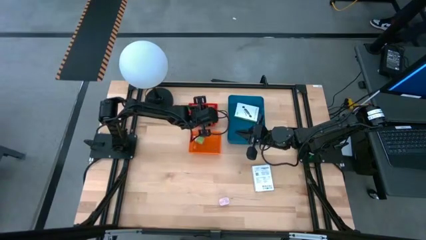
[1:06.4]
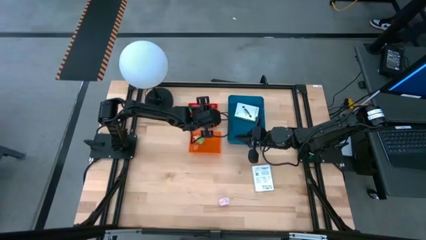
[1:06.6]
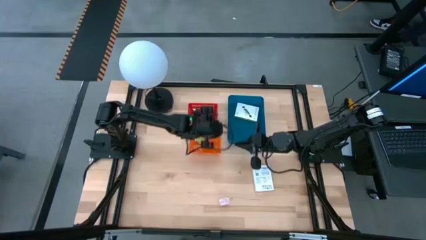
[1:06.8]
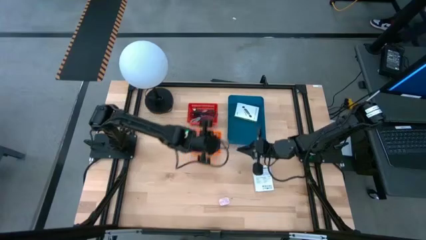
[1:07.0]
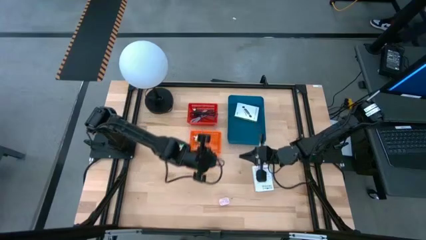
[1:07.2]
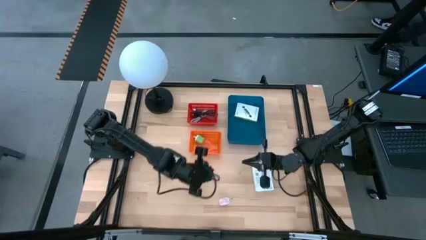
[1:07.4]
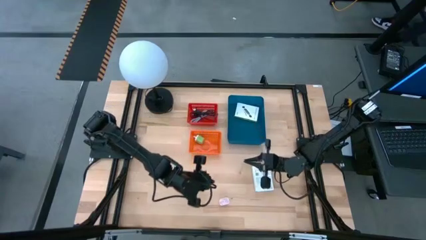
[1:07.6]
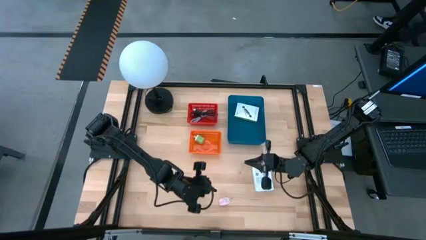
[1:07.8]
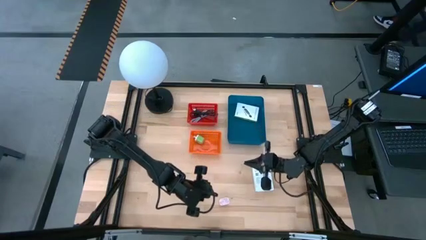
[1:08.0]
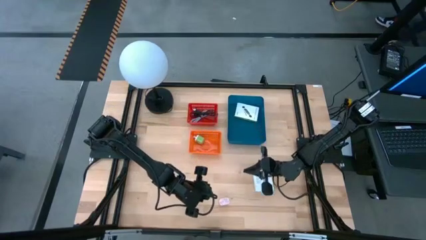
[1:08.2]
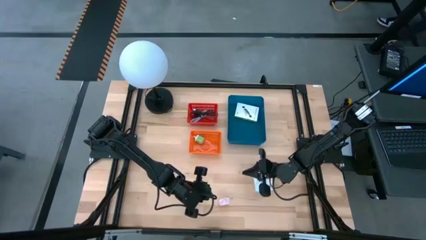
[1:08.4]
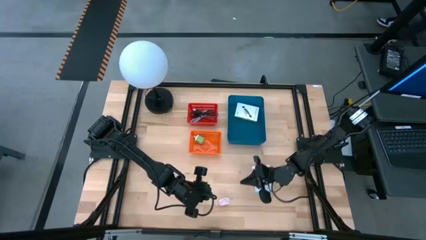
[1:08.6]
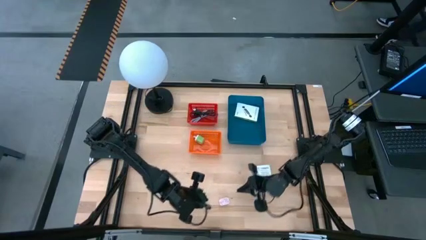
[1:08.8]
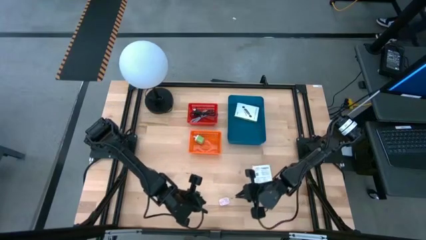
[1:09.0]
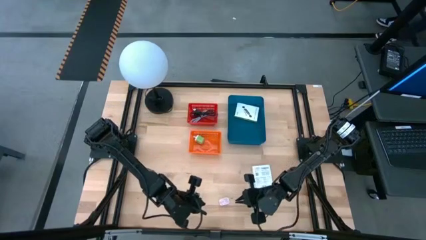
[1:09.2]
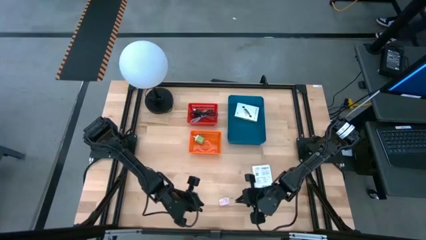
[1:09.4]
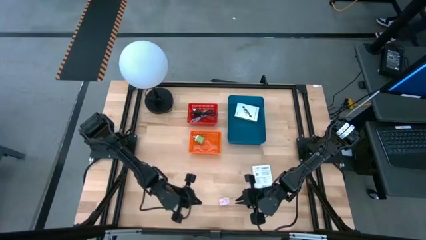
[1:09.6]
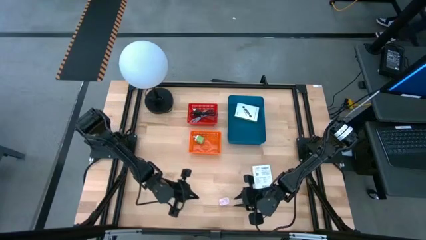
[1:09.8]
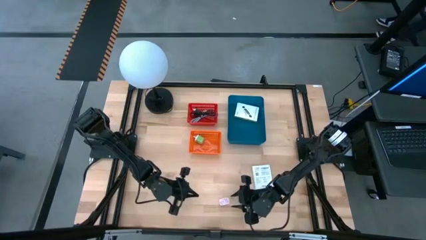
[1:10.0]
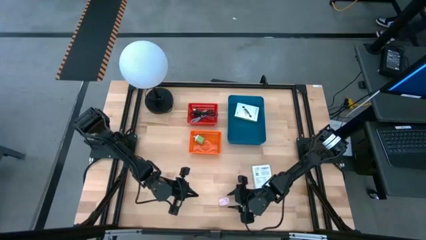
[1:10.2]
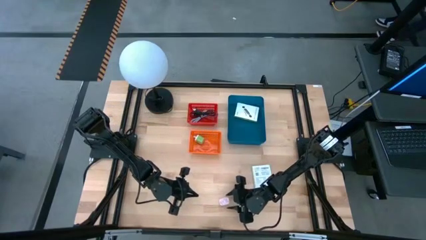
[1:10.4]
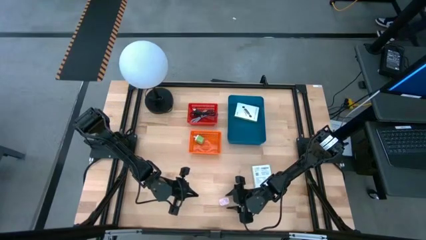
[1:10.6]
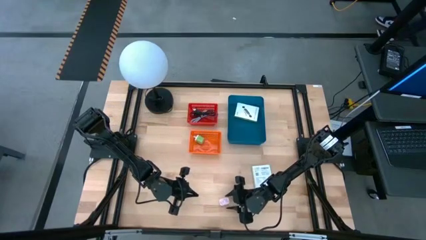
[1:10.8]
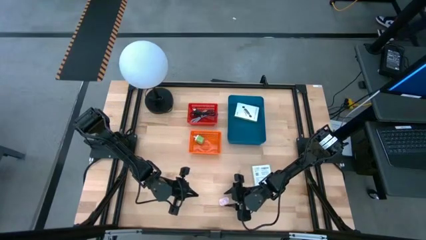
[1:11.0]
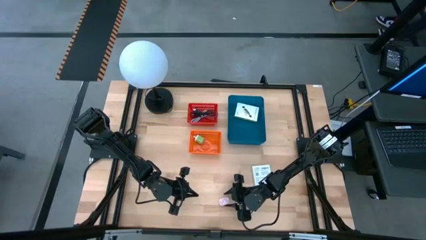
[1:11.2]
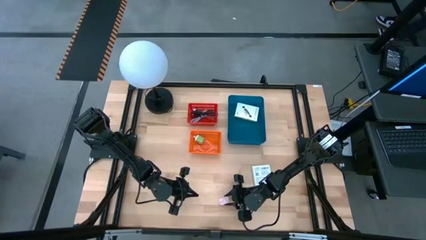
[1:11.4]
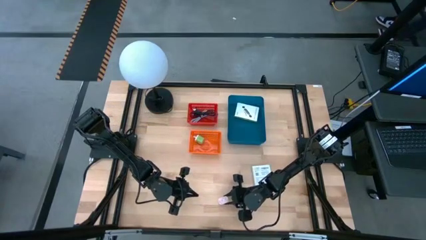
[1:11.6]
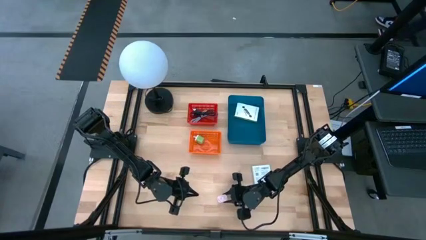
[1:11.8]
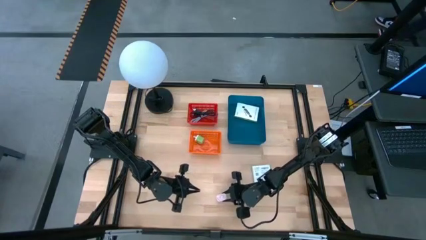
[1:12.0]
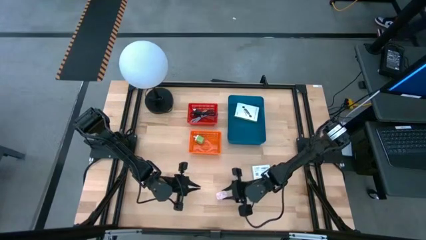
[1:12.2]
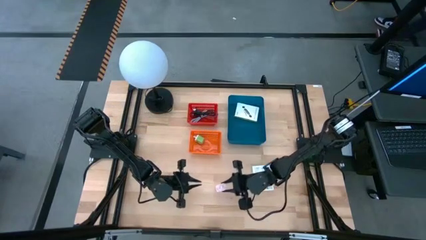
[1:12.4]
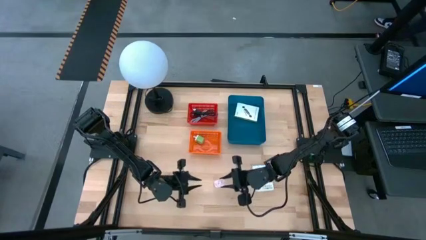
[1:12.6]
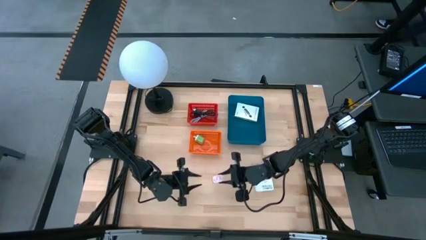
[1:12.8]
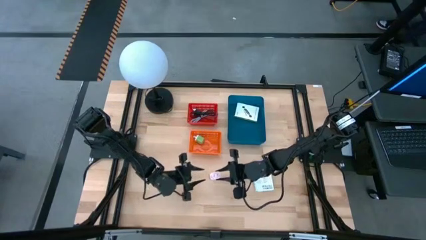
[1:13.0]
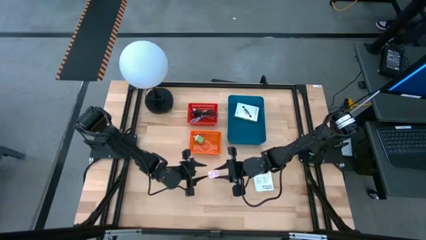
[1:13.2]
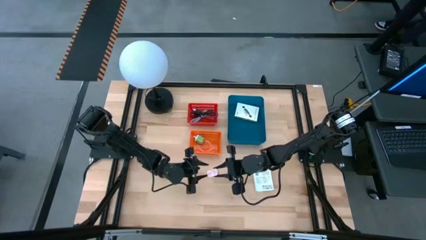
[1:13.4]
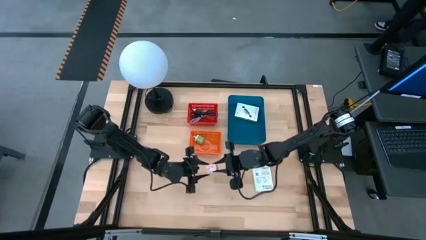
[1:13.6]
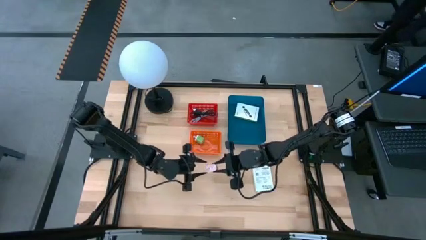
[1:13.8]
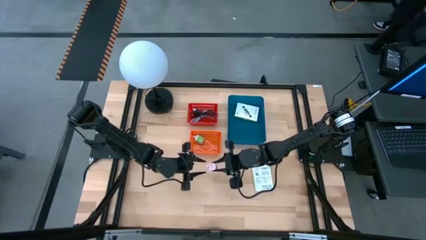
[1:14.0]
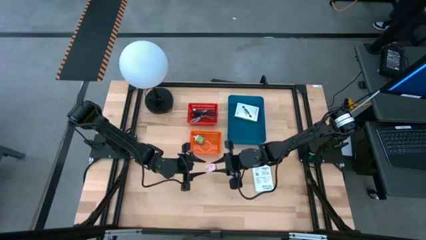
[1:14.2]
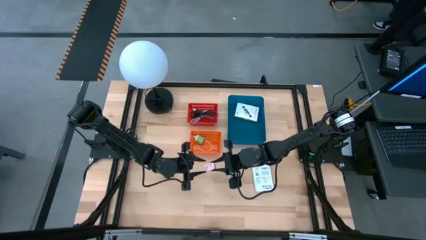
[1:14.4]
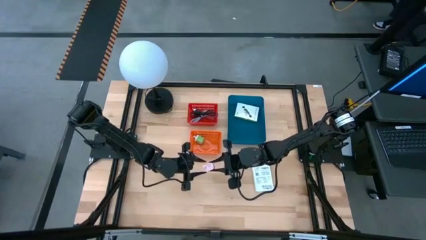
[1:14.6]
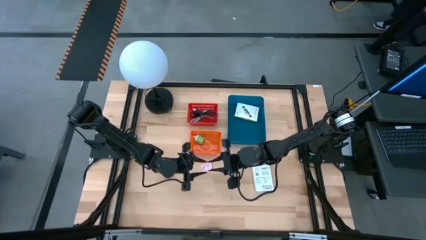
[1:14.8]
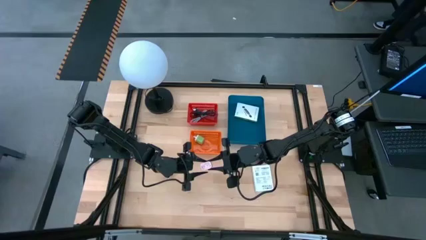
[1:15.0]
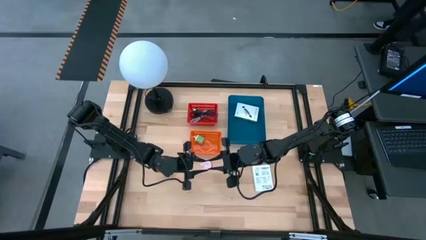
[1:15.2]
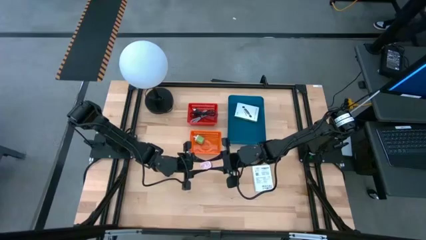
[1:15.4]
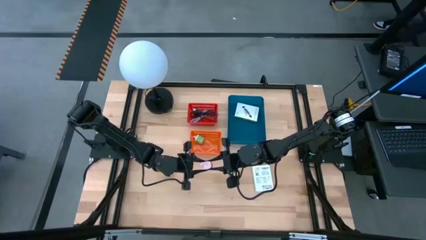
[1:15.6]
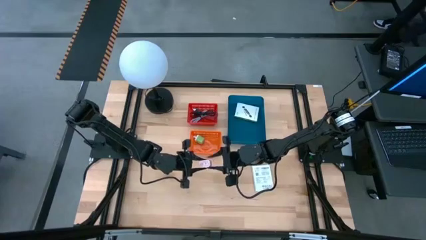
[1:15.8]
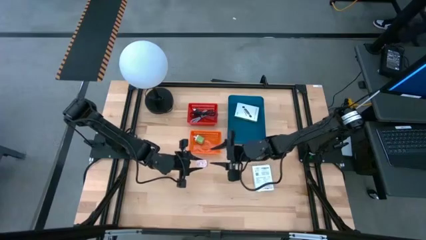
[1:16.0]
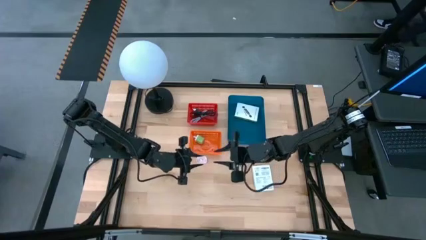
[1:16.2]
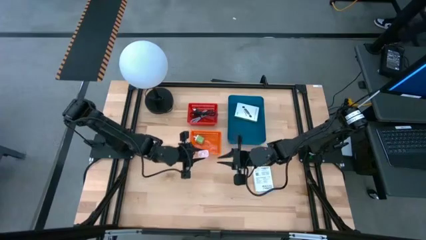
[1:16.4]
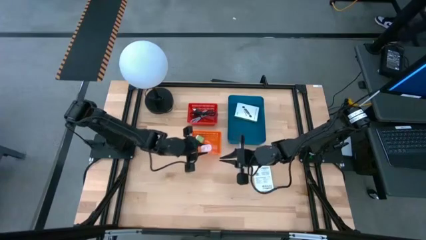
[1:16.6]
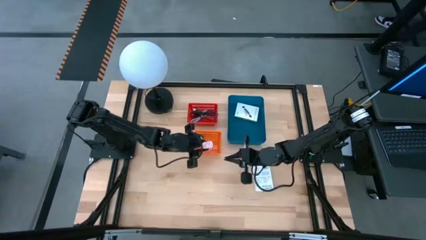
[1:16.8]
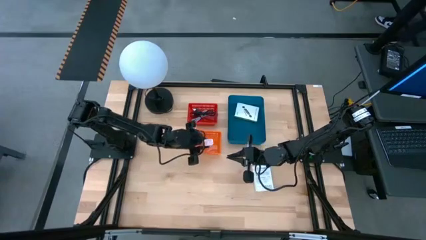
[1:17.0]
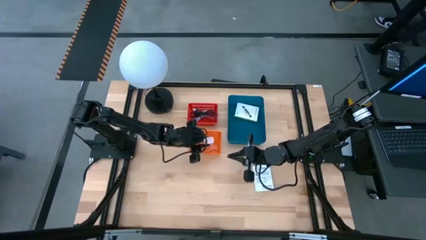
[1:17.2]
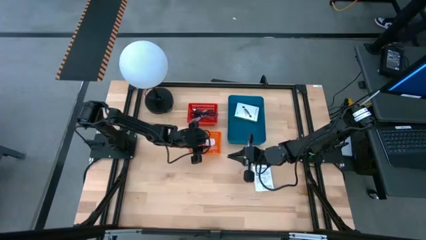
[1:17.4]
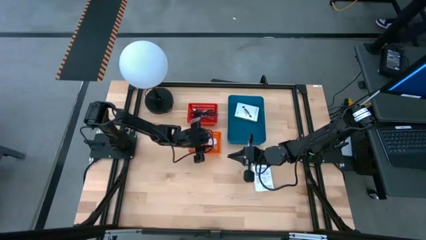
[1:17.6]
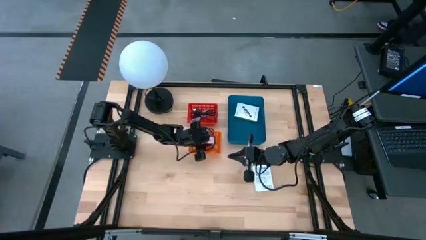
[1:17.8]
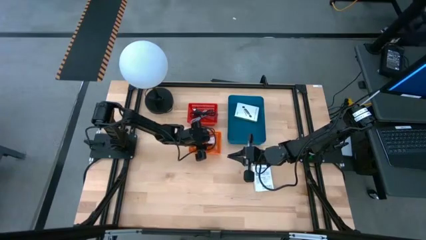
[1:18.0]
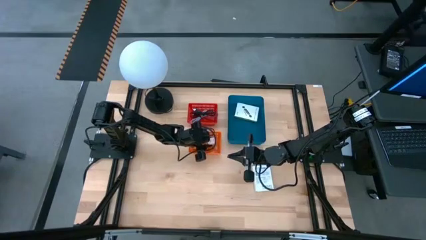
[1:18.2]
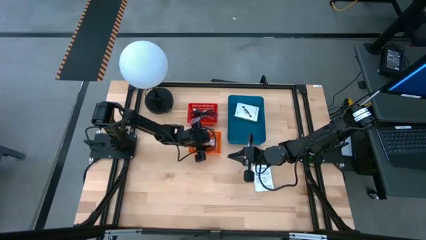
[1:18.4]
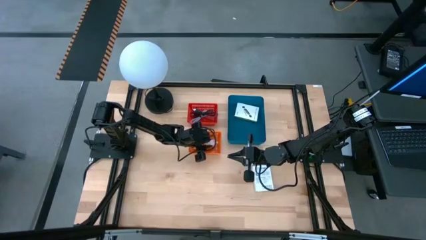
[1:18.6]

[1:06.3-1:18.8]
Task: Pick and place items into bin
Put the pink charger adapter into the orange bin
